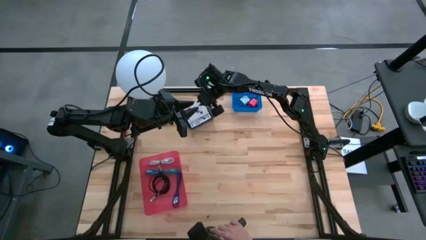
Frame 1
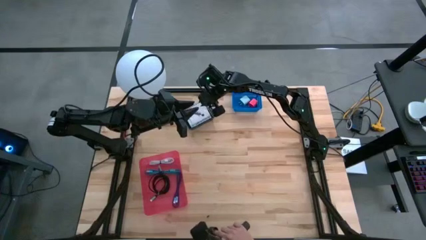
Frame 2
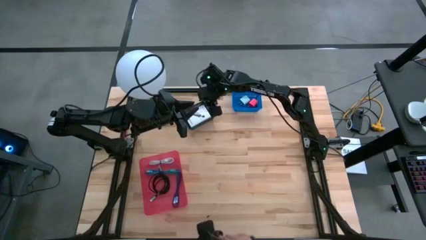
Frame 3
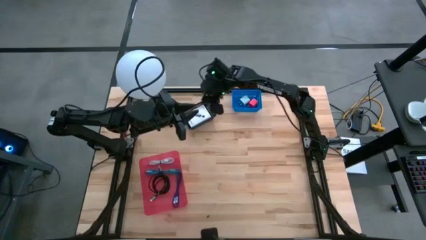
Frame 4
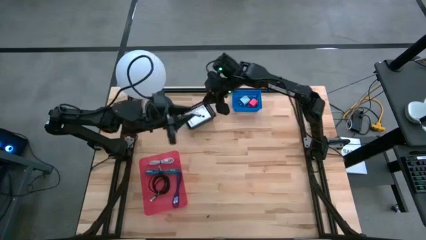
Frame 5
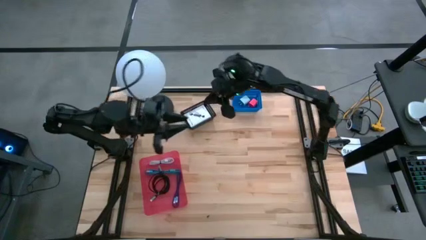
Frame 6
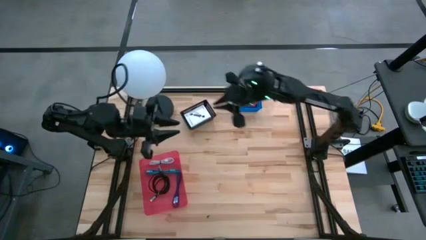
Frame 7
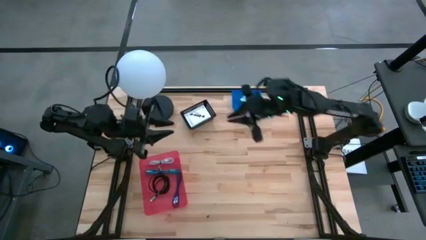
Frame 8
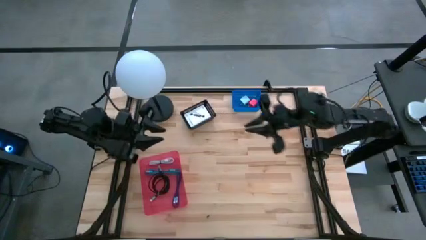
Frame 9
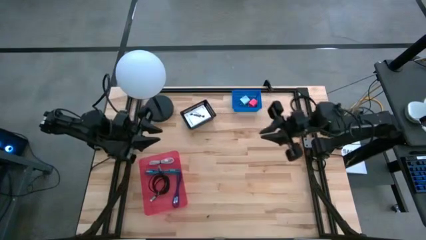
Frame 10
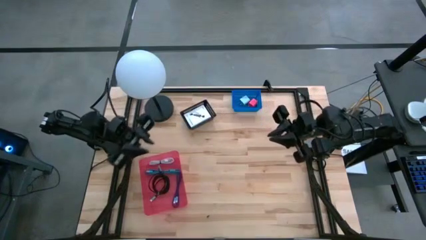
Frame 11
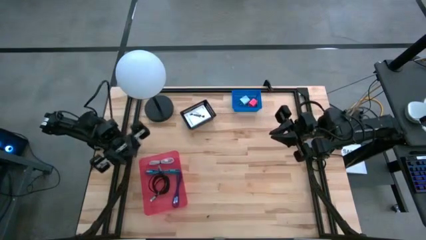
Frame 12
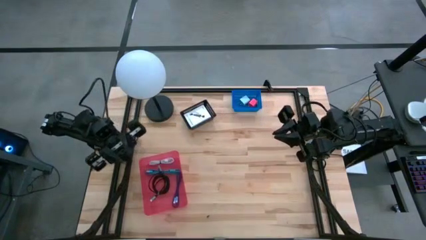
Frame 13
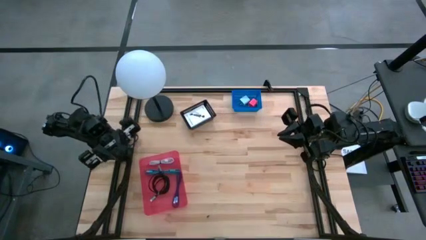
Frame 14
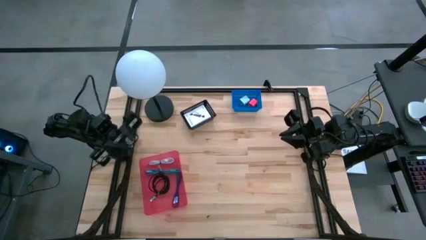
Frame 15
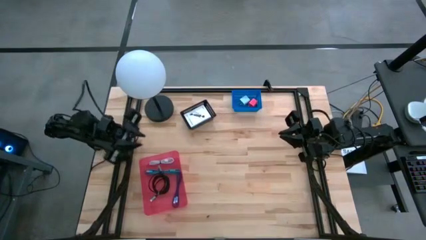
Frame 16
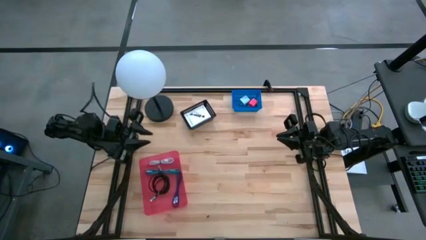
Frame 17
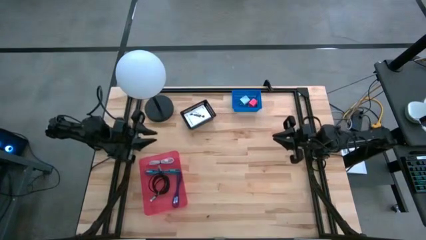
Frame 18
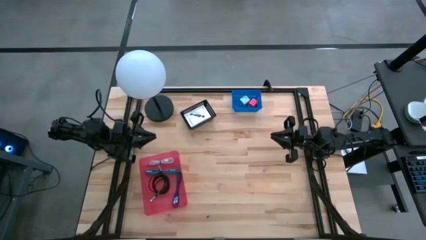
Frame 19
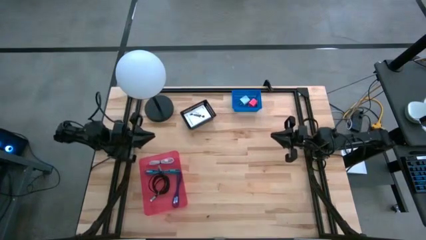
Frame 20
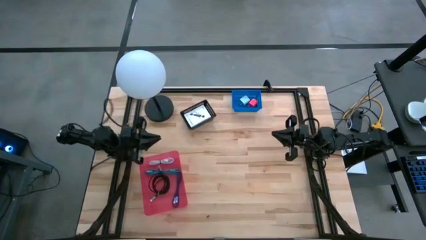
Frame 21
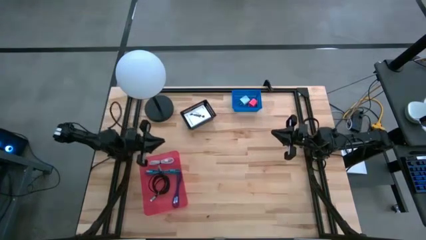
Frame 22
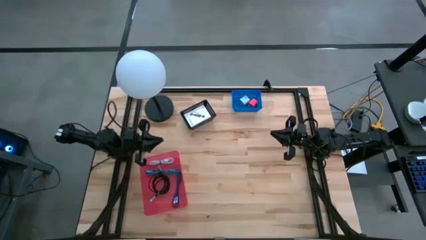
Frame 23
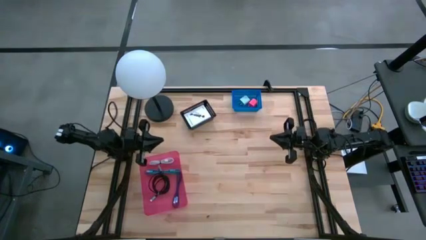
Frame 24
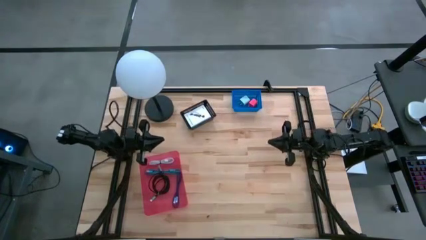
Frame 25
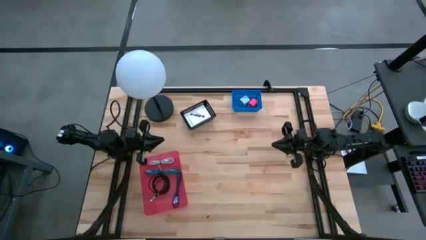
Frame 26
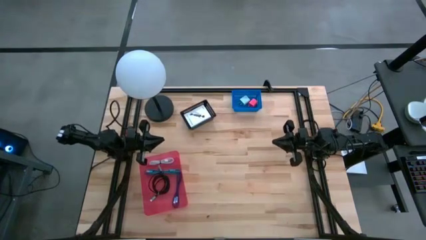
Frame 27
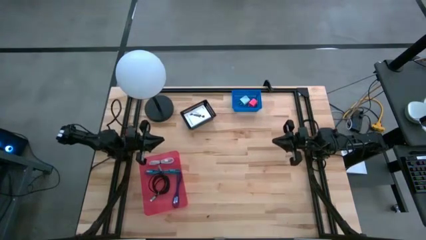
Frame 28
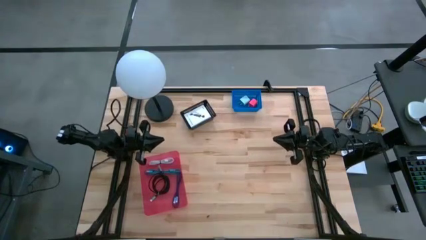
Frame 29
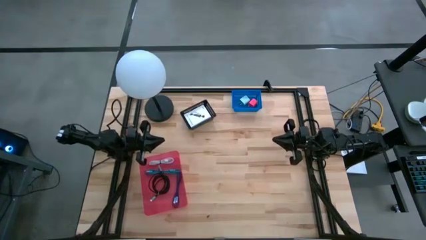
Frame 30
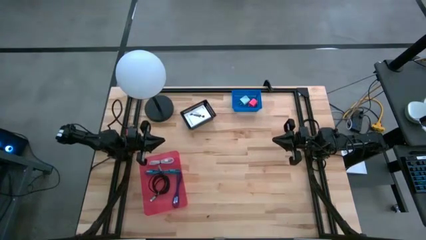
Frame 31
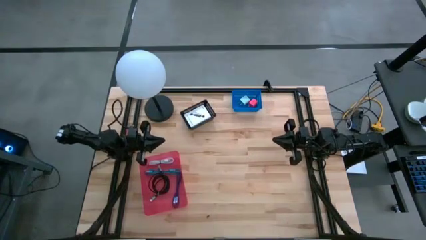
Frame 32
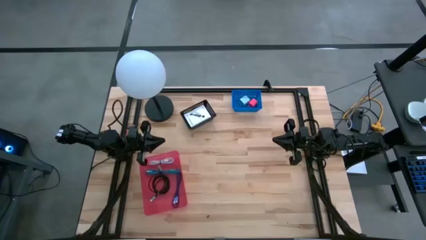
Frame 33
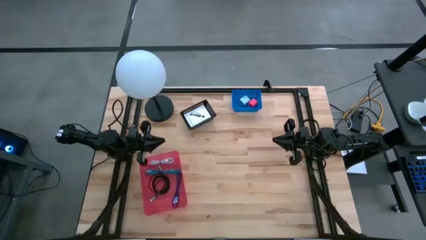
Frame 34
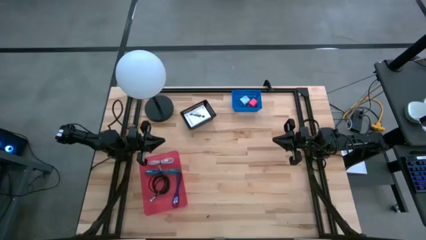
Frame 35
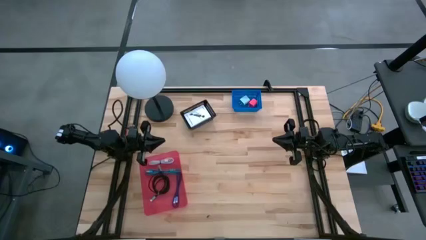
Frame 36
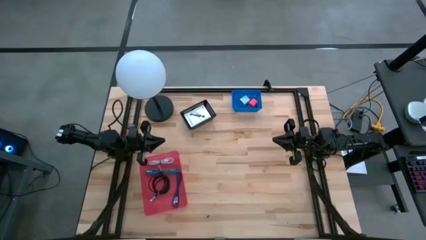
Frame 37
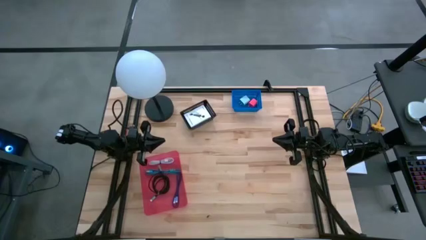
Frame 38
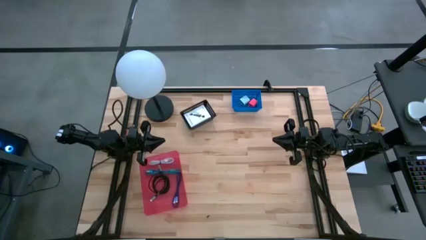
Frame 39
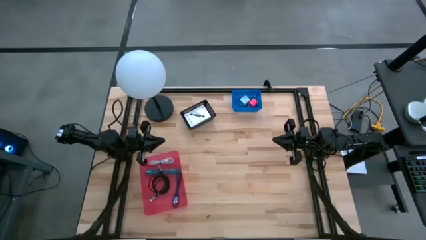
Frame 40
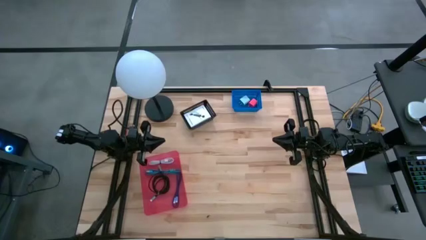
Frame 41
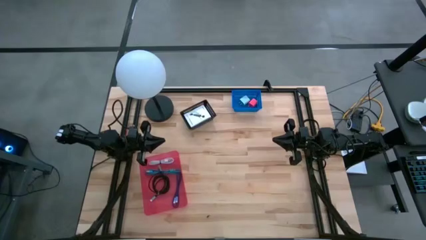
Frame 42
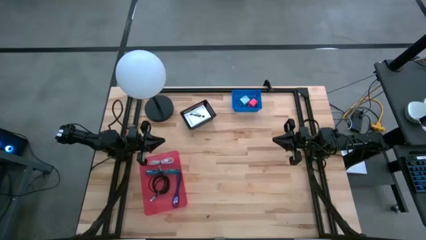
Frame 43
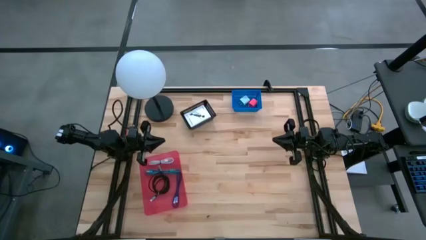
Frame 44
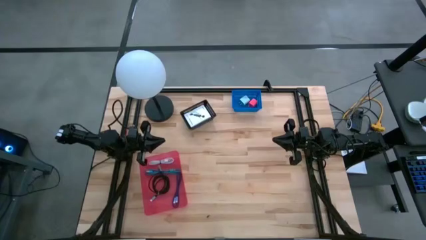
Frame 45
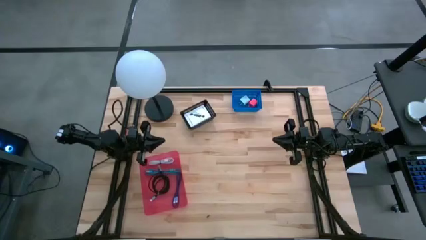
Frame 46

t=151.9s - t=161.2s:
Task: Pick and place items into bin
Return to home position
